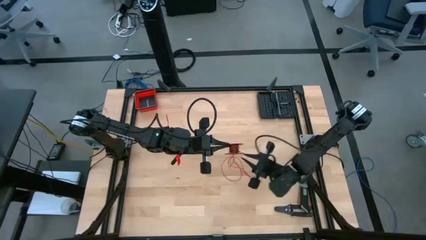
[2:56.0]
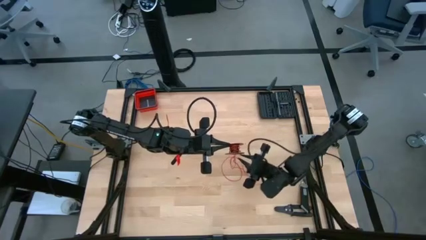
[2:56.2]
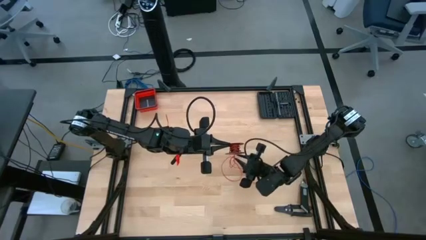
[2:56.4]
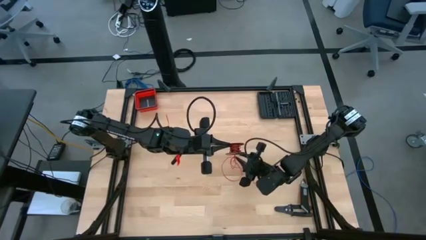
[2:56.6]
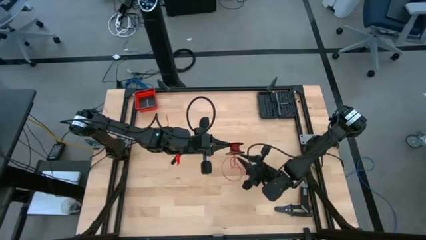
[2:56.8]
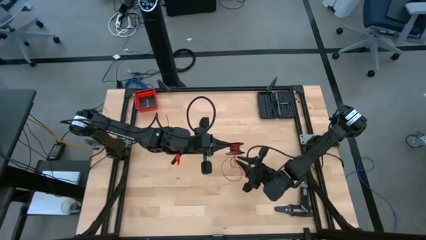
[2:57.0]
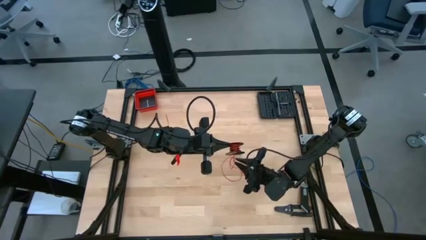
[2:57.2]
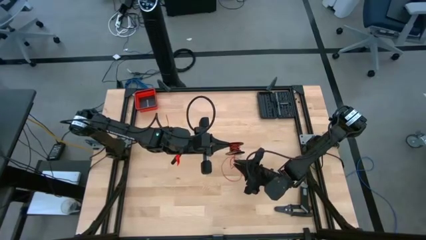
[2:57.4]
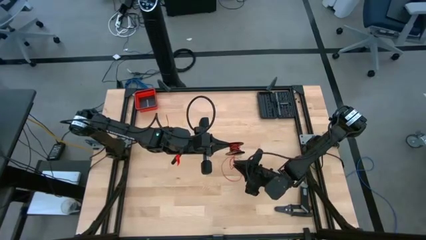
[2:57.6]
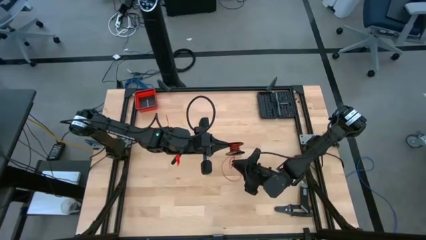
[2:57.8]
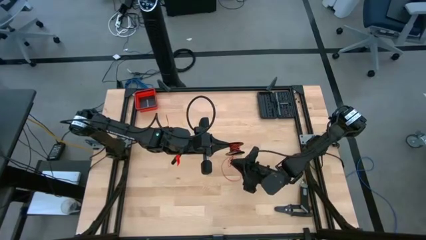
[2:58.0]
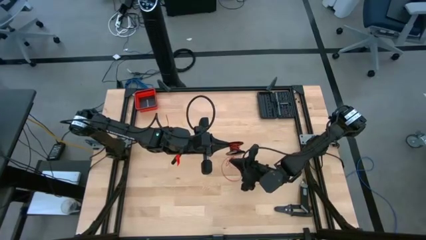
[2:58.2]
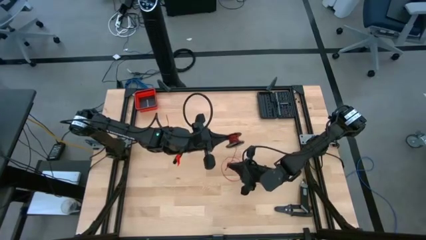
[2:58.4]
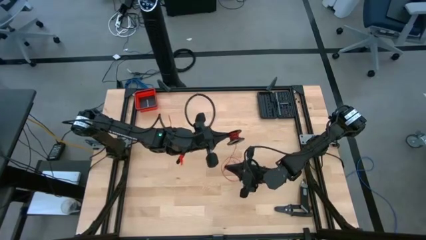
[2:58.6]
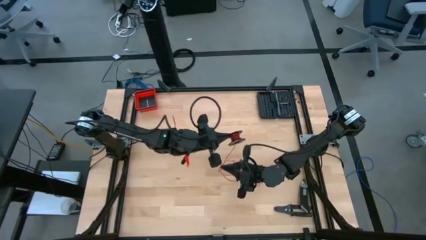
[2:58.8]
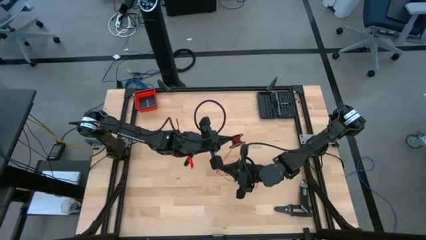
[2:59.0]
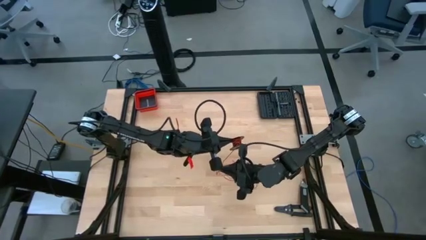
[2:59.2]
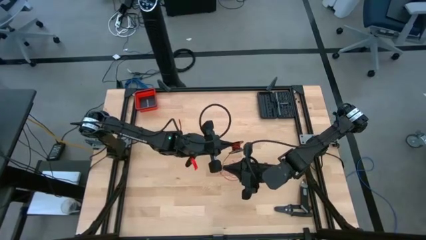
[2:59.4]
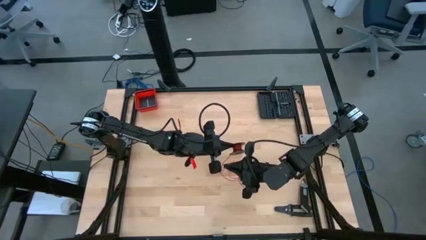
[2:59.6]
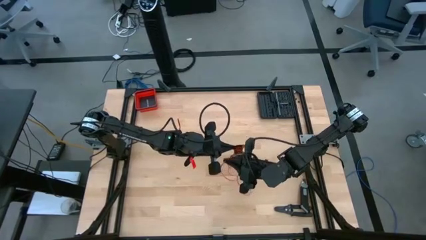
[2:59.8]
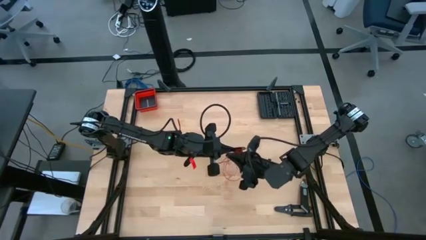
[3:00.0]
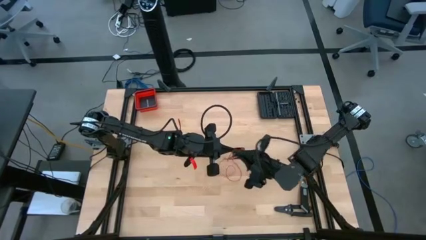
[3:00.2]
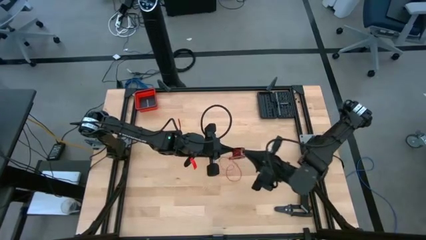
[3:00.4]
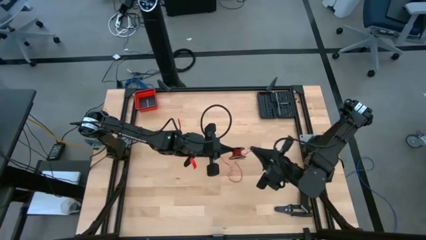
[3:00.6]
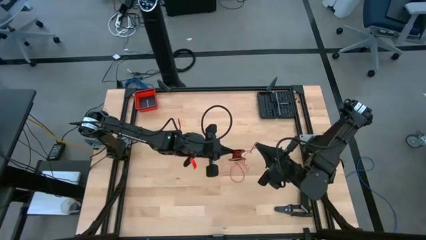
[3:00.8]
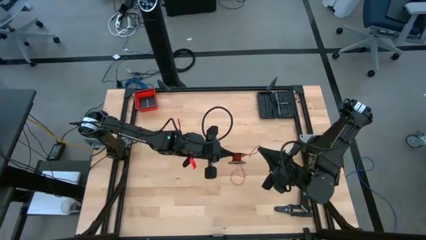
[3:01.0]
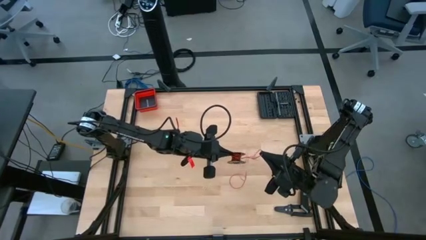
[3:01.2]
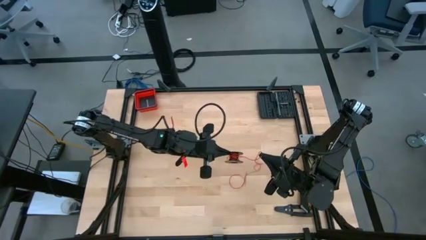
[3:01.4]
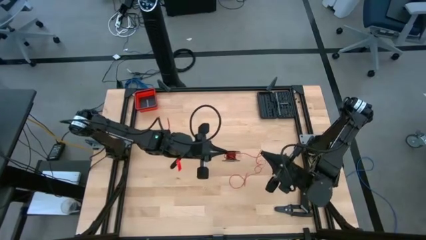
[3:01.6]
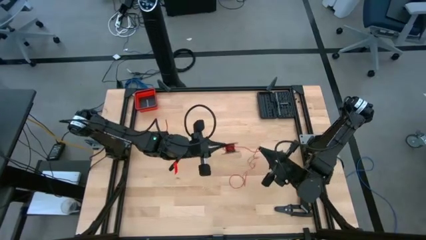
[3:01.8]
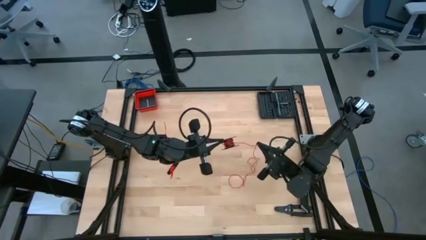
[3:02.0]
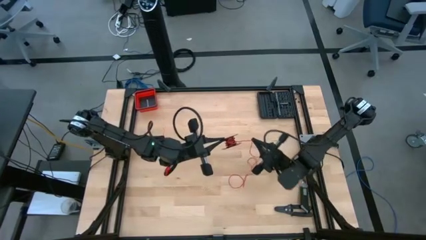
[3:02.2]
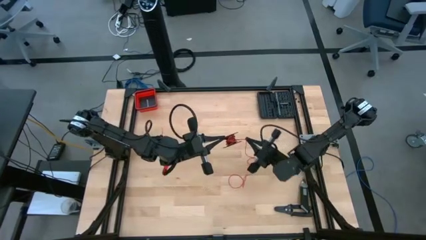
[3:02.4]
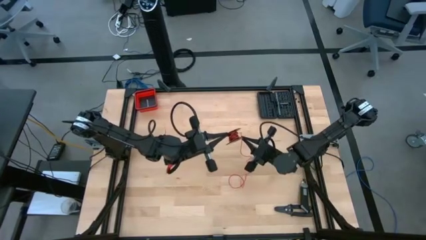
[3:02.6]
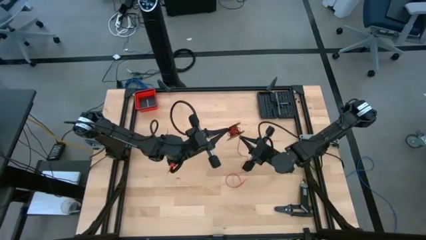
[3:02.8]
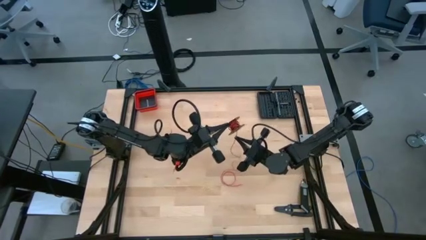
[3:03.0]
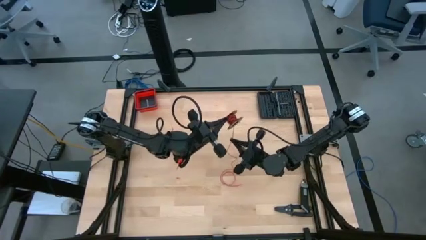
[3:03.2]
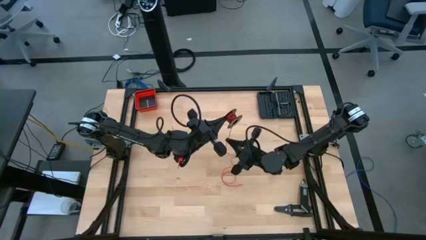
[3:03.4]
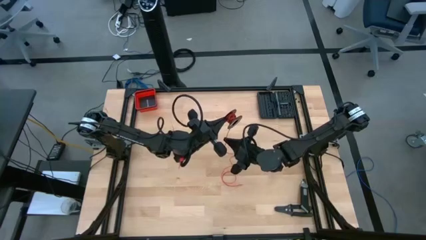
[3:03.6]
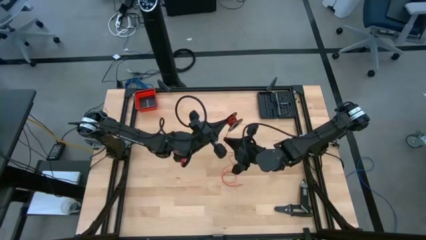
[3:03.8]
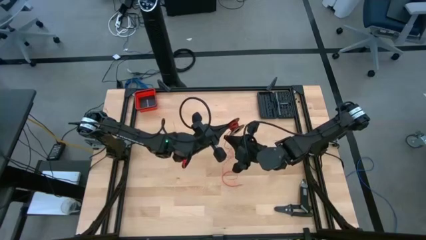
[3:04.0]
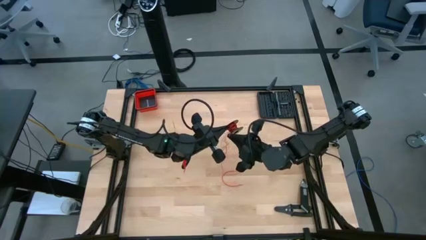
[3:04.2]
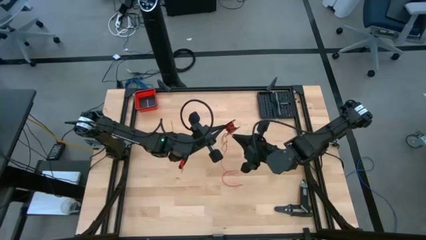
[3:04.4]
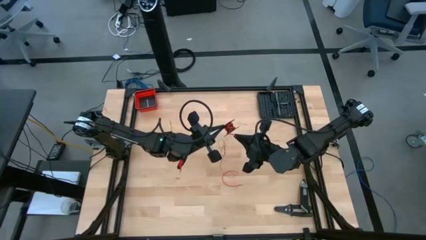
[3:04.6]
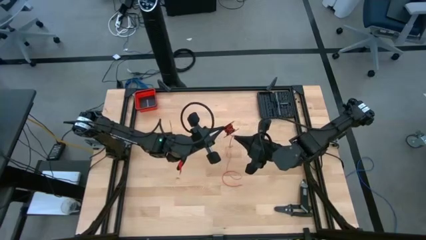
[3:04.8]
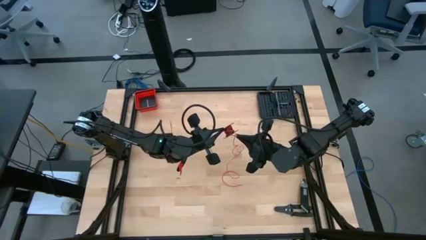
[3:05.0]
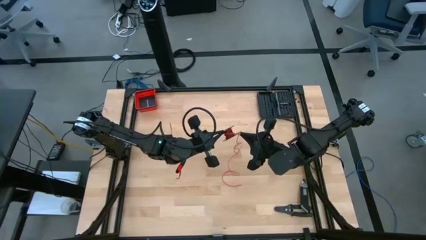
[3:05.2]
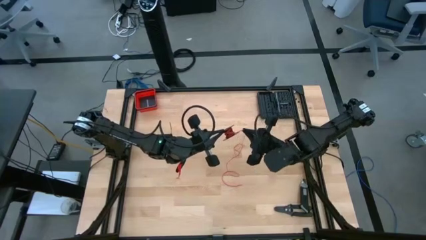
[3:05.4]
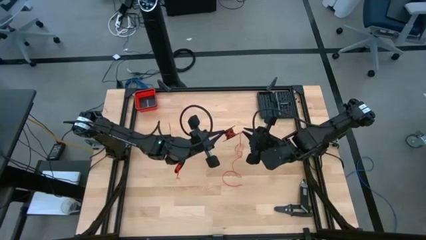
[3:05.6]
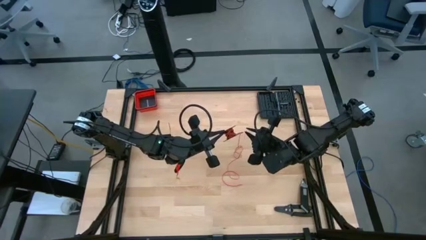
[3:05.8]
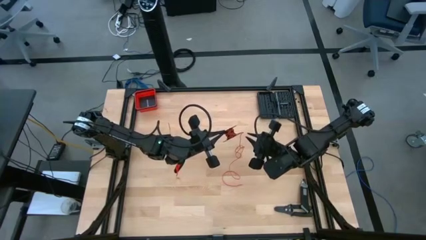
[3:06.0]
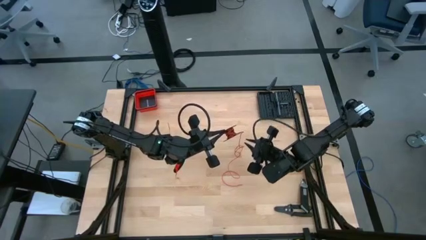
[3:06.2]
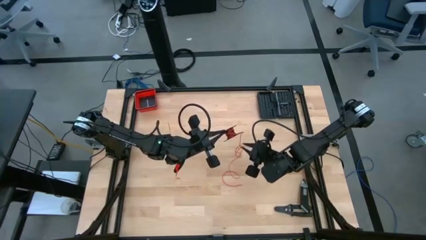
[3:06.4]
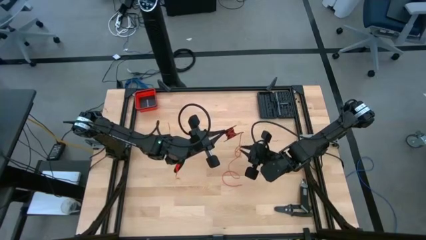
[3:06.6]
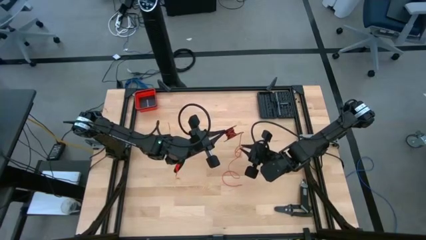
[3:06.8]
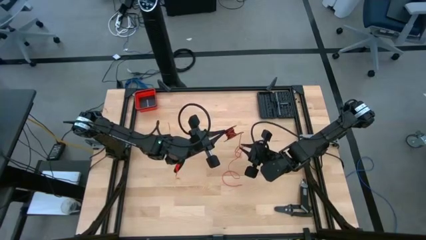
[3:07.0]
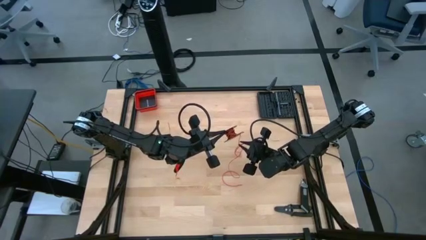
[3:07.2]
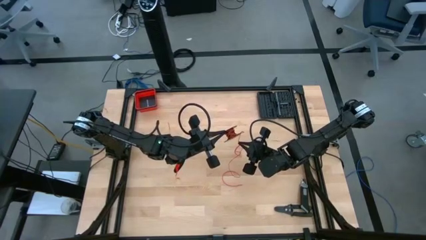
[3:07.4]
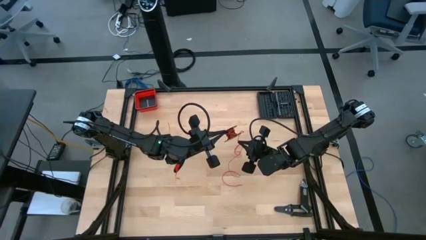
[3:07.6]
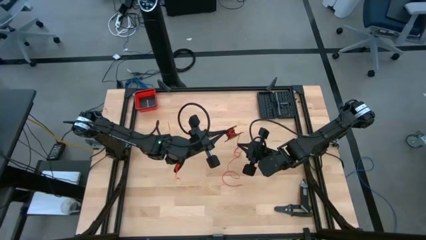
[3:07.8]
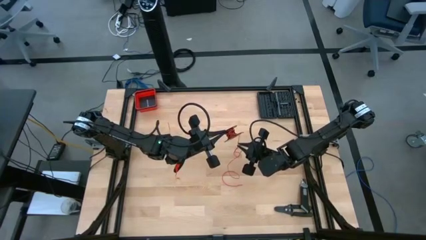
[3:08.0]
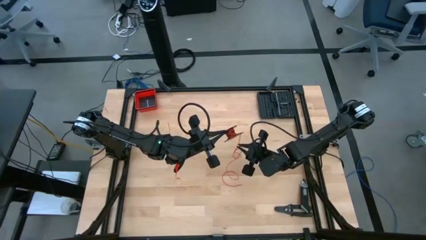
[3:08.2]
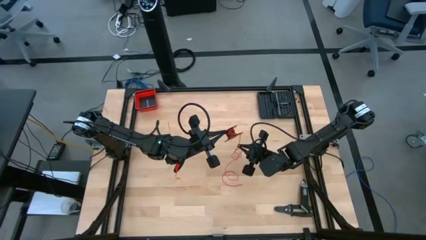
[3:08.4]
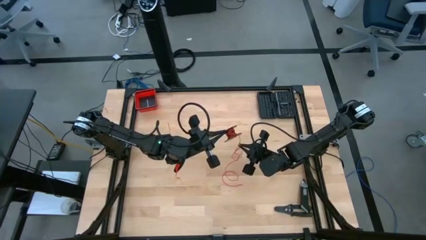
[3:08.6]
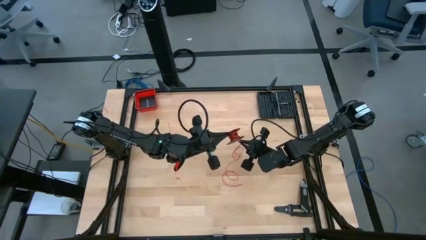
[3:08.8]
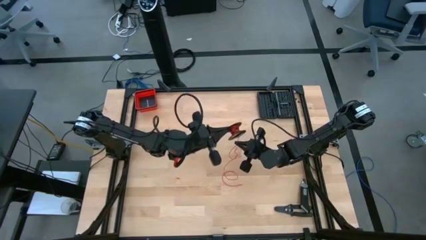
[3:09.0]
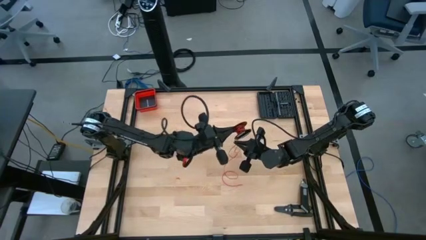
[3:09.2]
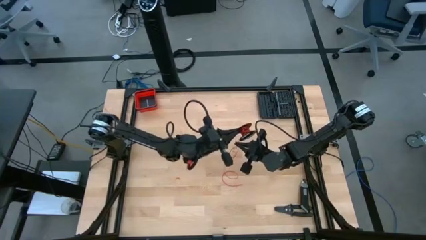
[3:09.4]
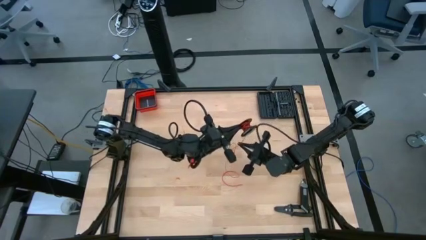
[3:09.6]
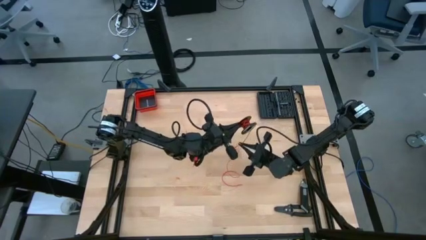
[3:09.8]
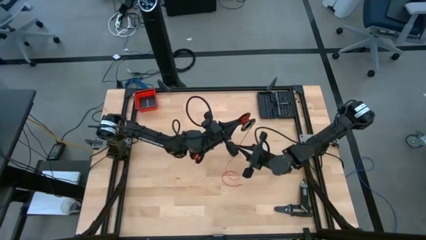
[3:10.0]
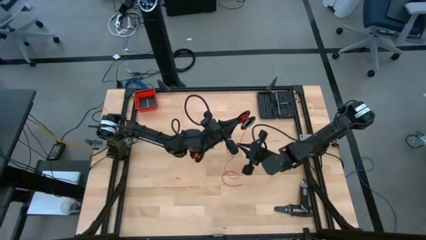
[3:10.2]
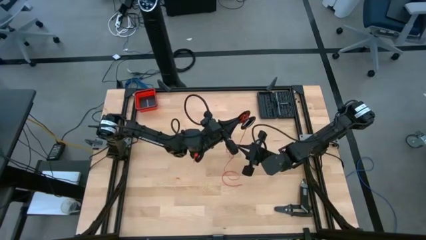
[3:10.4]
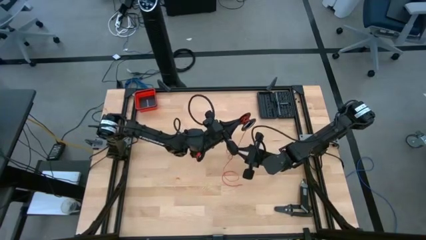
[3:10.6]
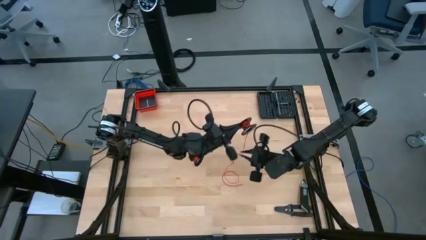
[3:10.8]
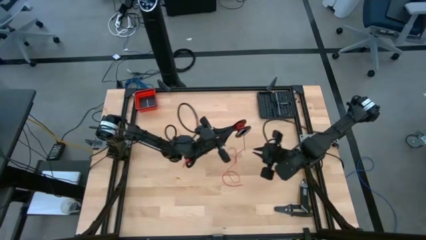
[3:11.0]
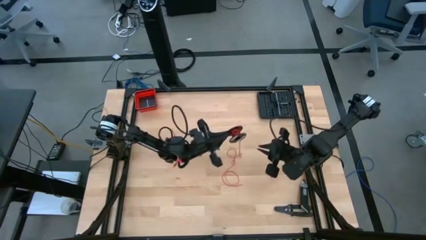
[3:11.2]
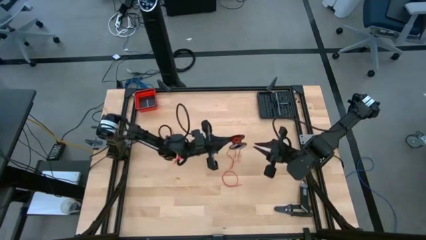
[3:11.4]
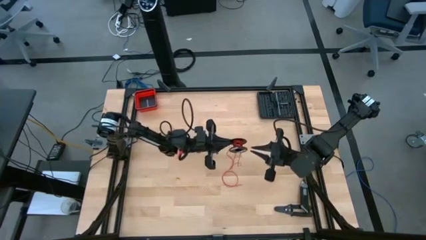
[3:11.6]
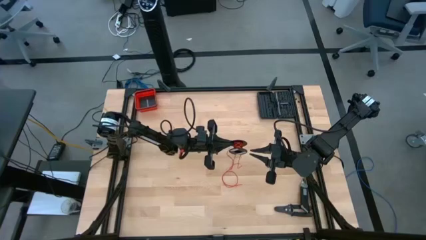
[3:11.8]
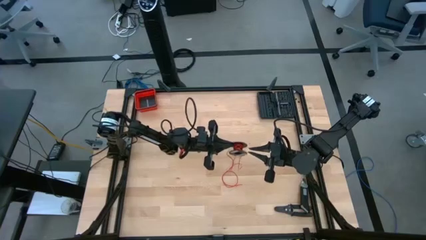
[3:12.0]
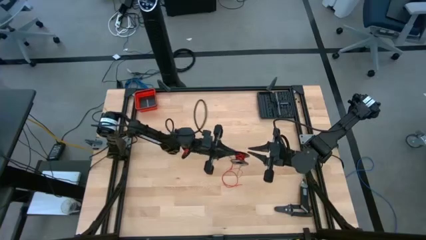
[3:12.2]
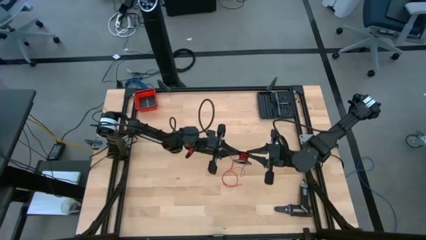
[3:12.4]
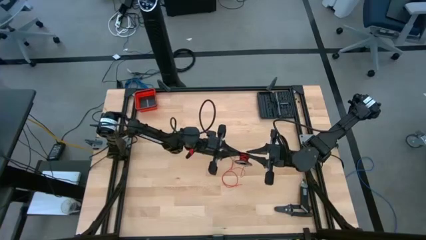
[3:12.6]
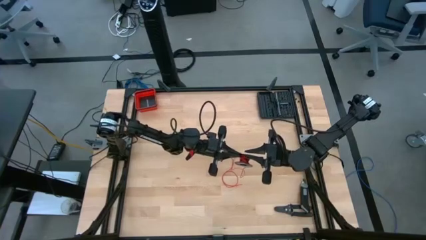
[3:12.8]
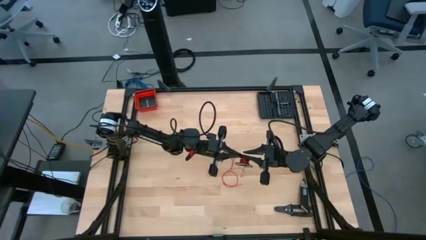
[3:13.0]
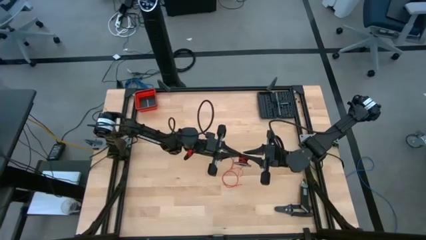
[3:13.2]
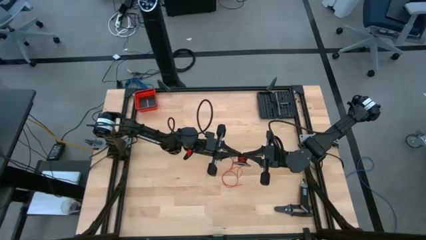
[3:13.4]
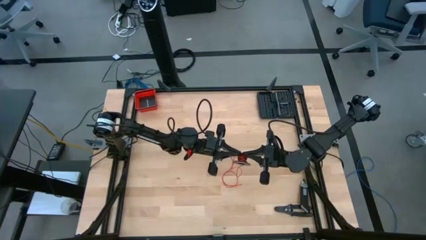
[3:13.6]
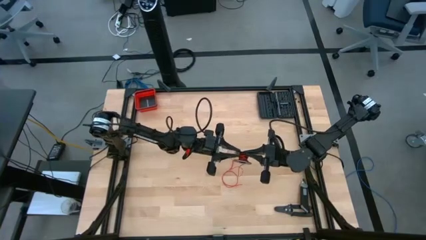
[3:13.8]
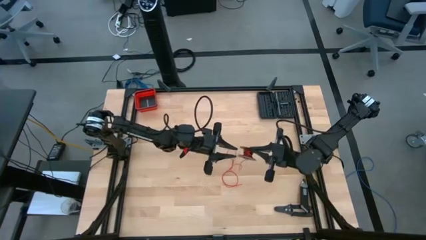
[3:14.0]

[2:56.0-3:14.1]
Task: Coil cords
Coil the red wire onto the spool
